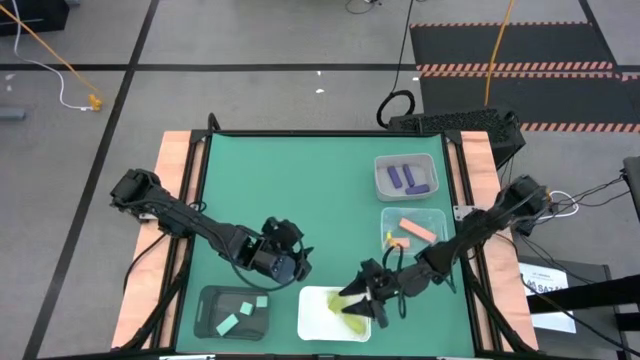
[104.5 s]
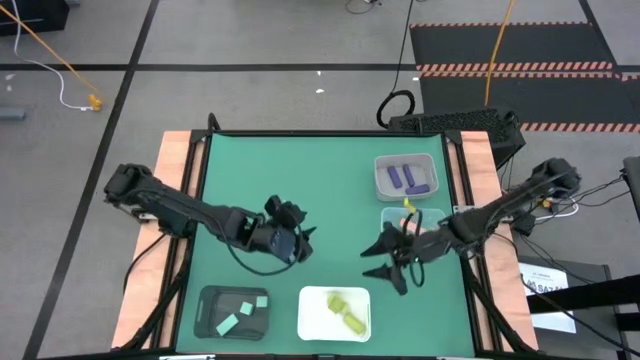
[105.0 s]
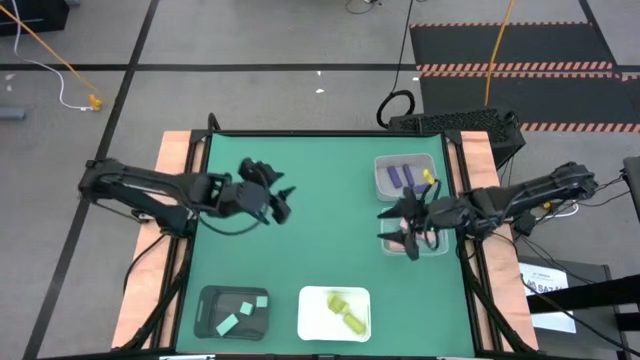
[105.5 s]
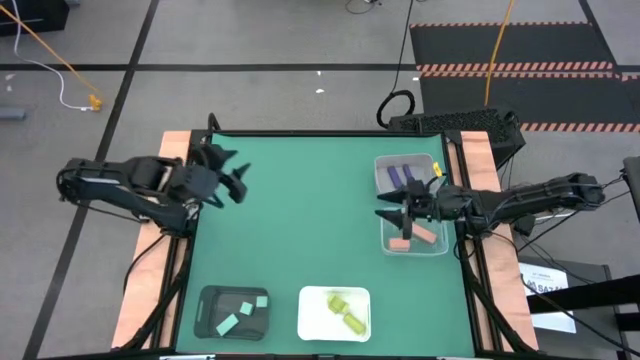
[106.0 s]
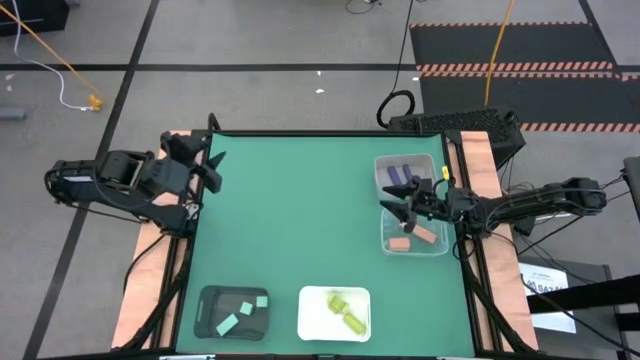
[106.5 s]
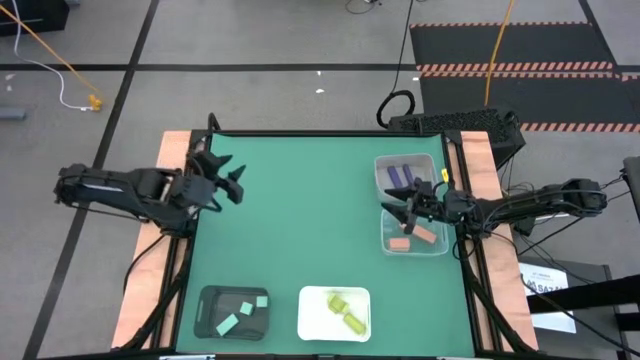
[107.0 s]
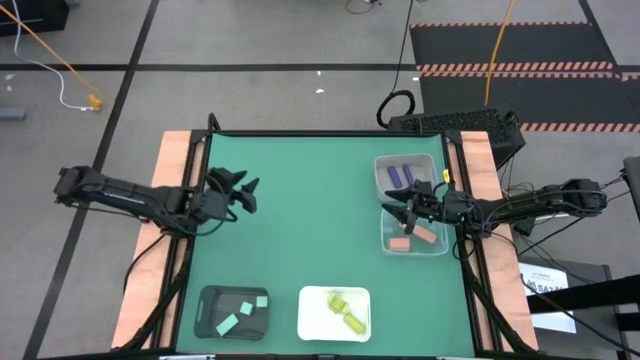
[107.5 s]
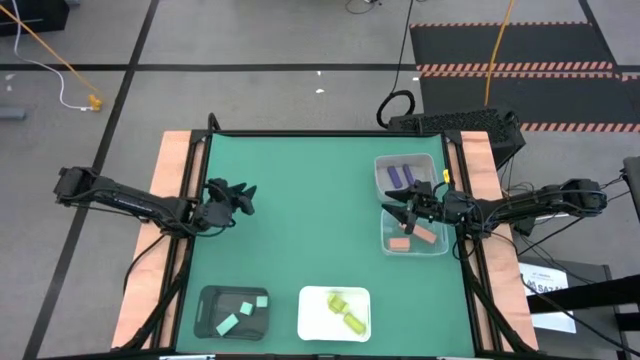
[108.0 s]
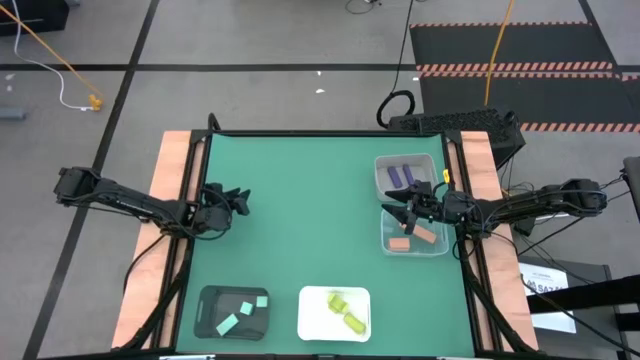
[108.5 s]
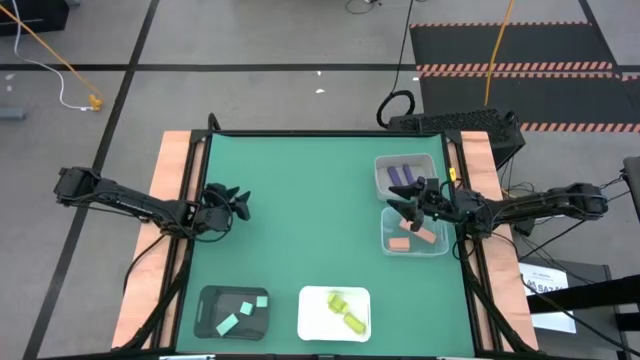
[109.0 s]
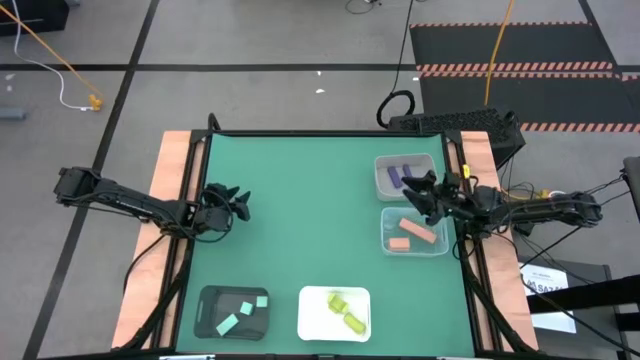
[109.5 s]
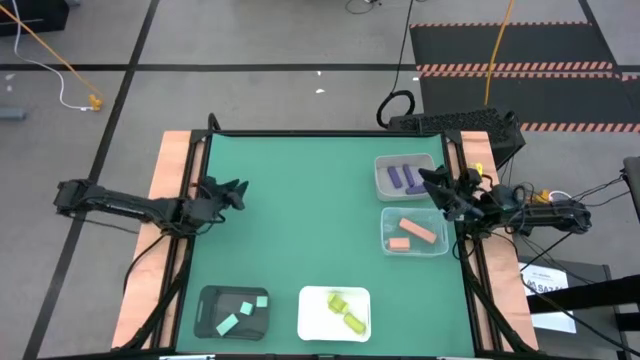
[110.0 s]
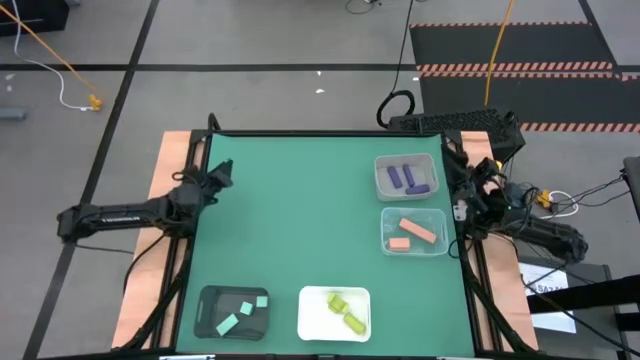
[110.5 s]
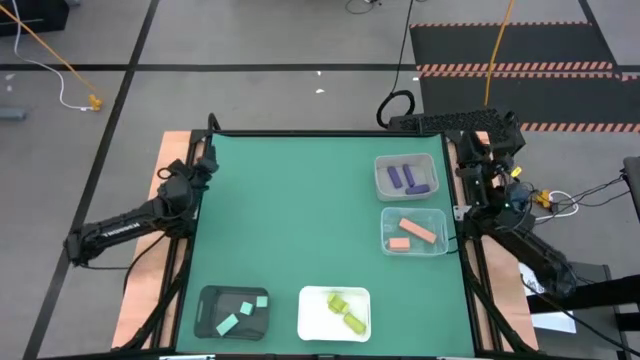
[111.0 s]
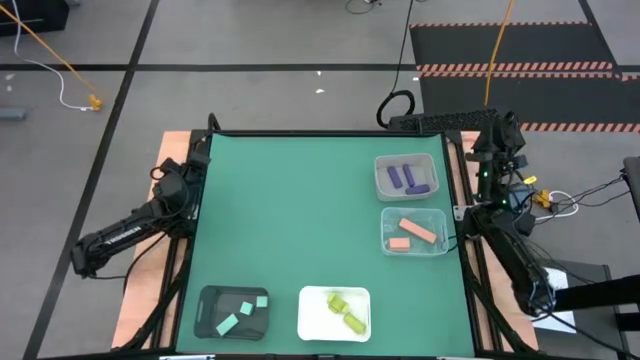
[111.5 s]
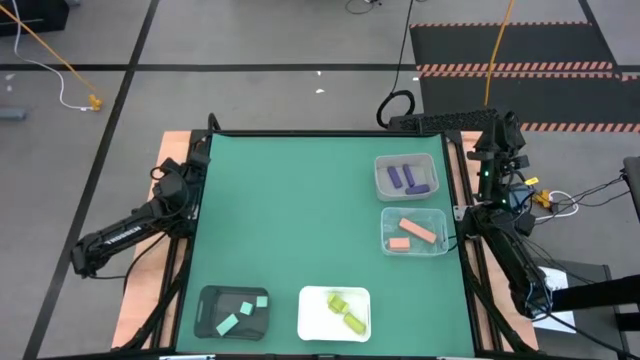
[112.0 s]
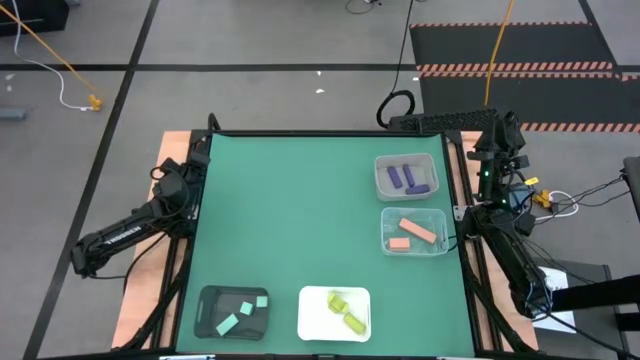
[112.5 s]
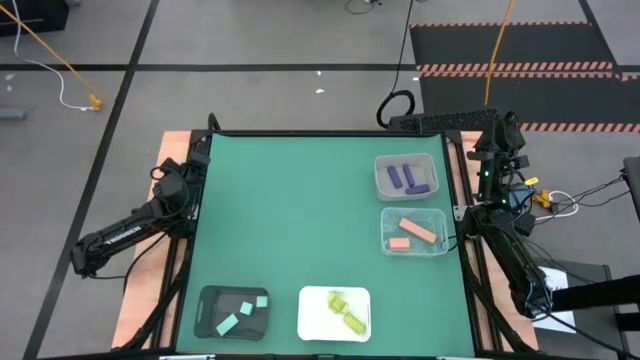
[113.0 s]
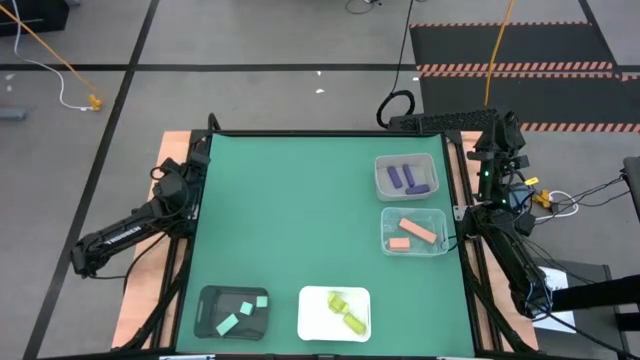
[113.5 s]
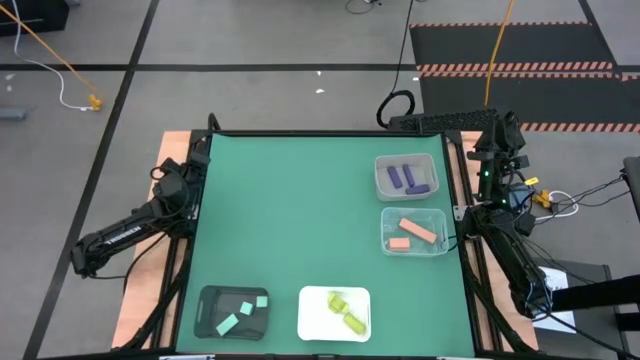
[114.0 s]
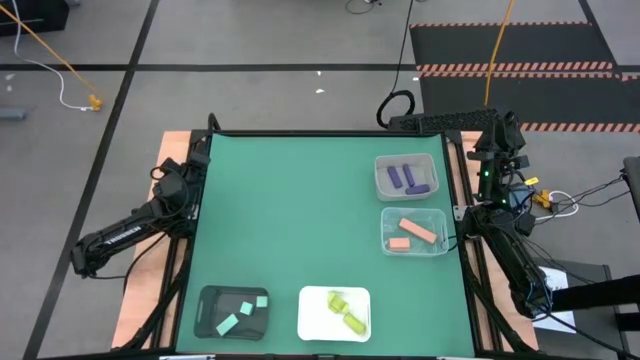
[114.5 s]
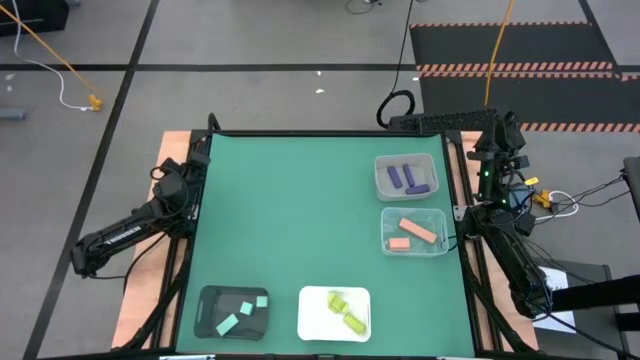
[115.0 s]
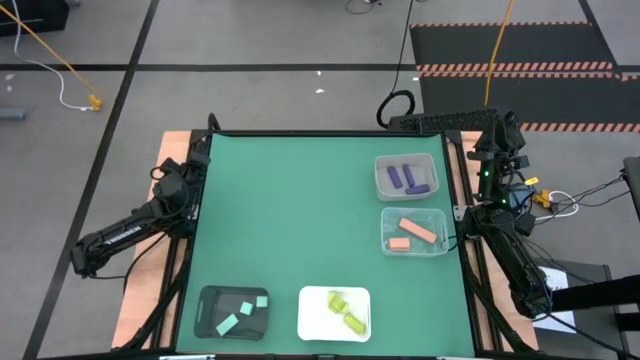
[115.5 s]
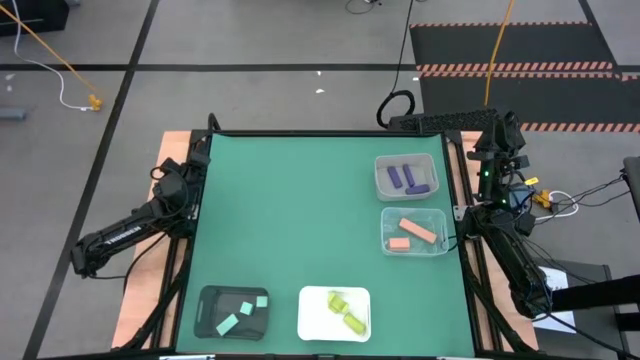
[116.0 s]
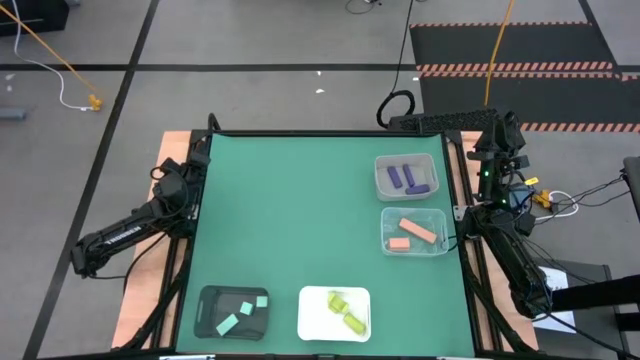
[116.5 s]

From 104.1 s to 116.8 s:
Task: Sort & place blocks by color
Return to Home Position

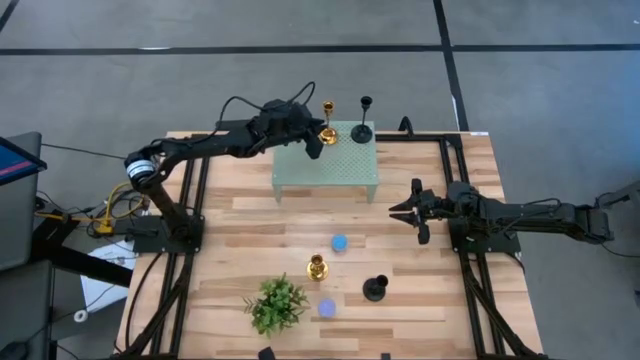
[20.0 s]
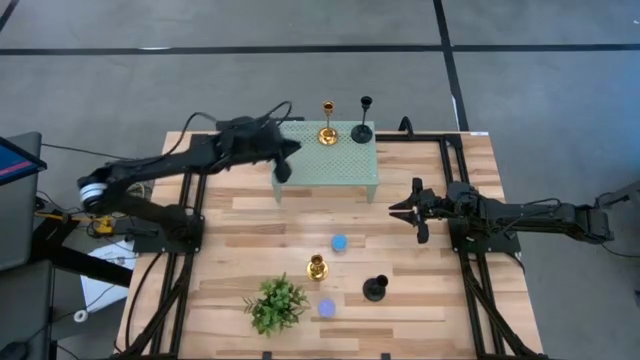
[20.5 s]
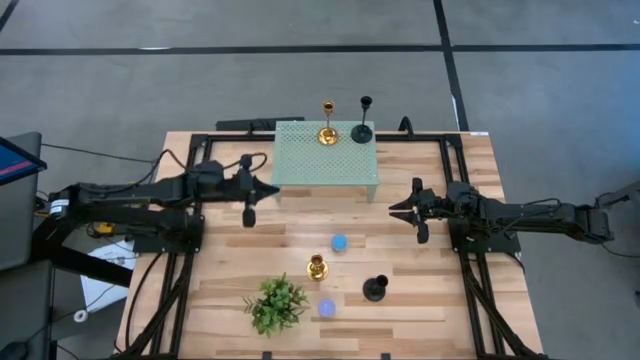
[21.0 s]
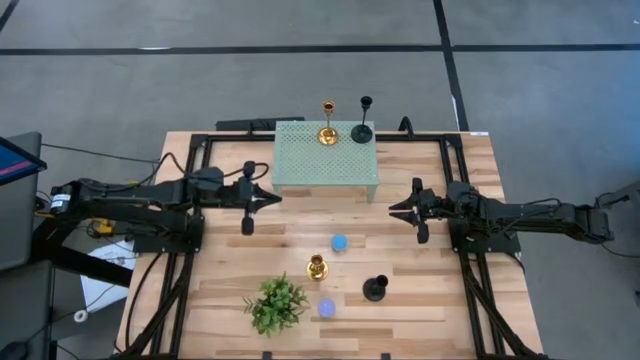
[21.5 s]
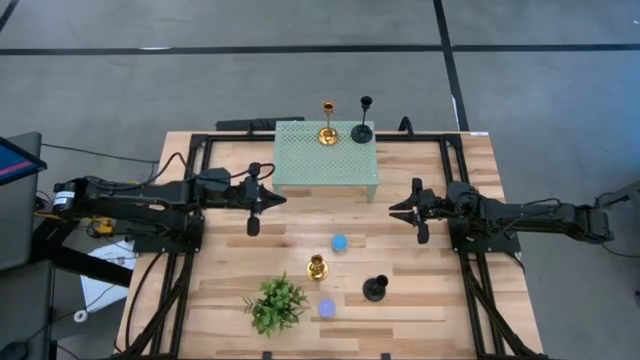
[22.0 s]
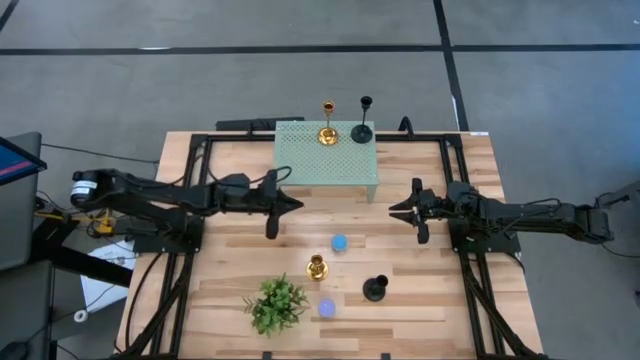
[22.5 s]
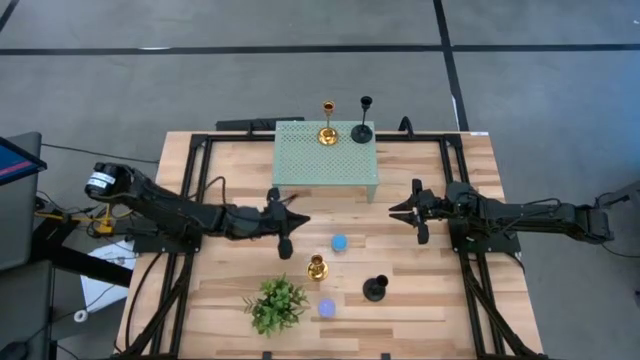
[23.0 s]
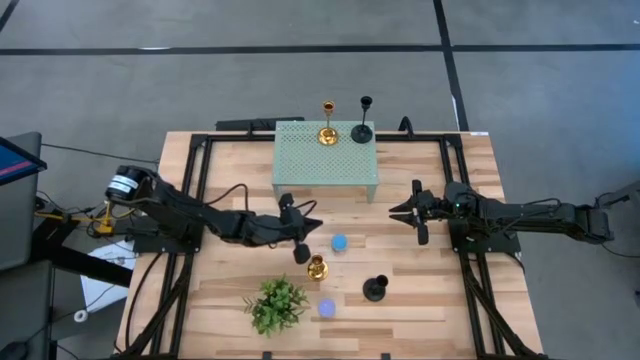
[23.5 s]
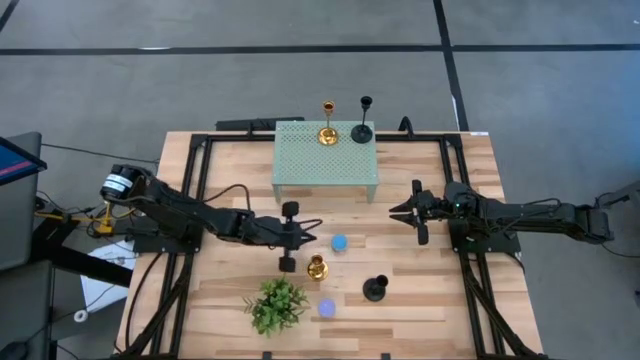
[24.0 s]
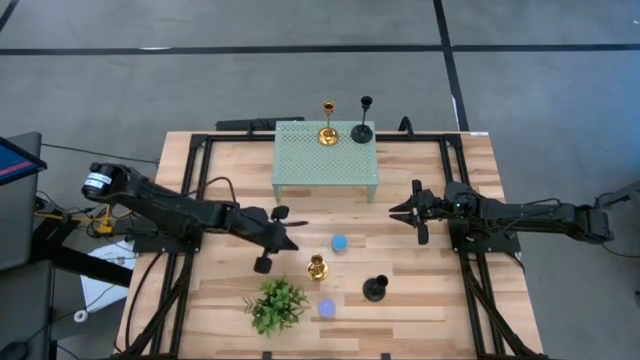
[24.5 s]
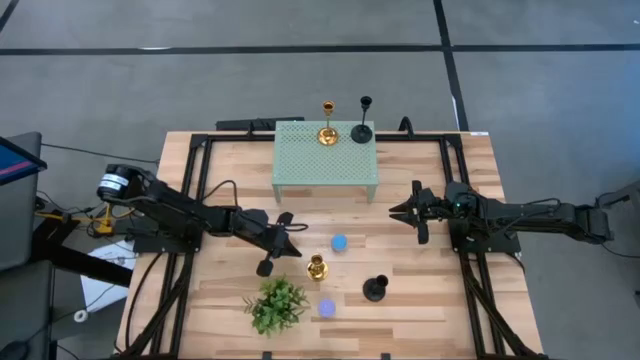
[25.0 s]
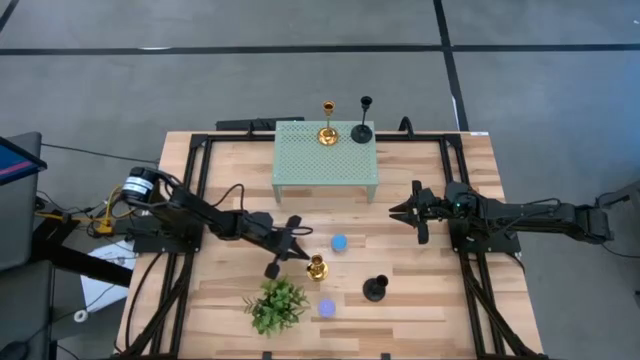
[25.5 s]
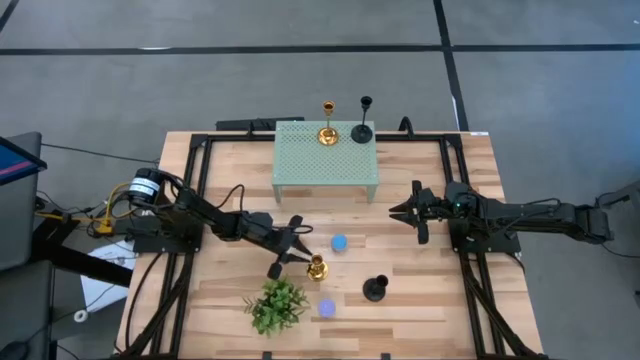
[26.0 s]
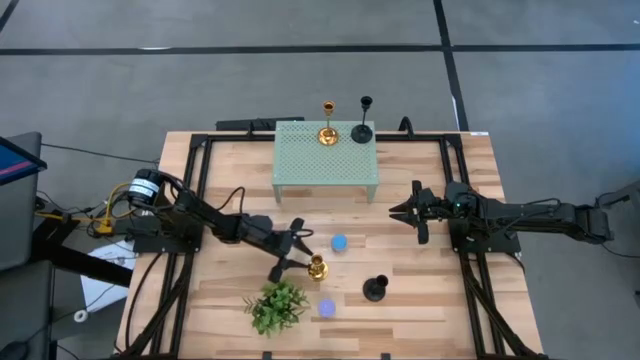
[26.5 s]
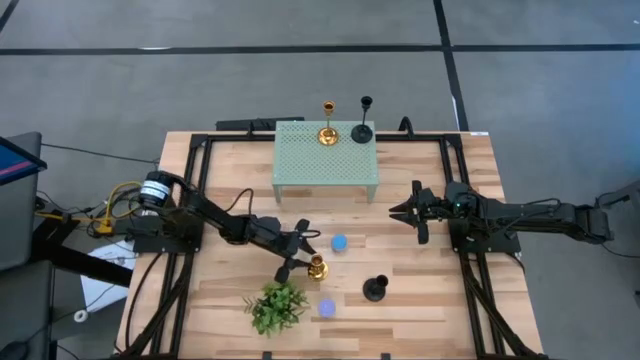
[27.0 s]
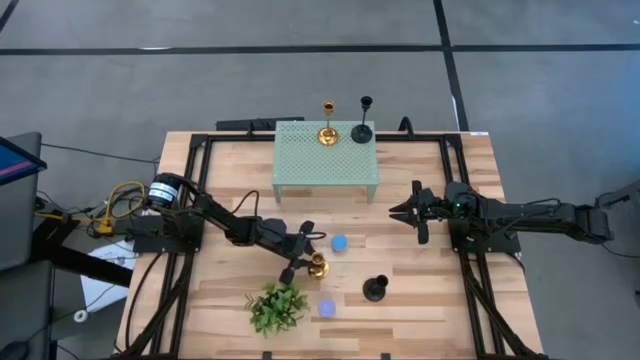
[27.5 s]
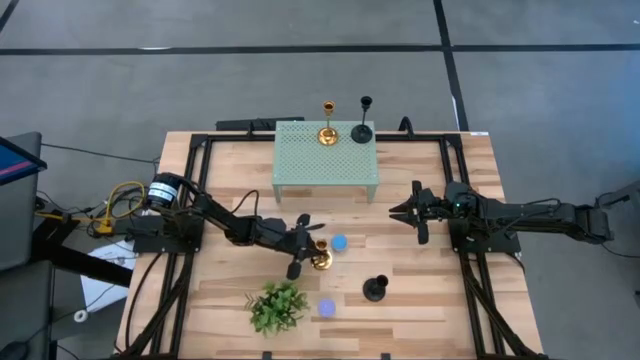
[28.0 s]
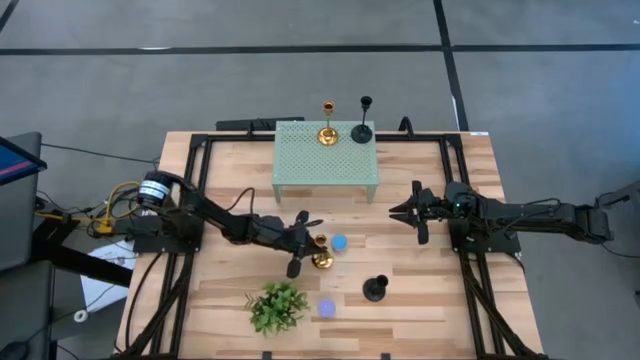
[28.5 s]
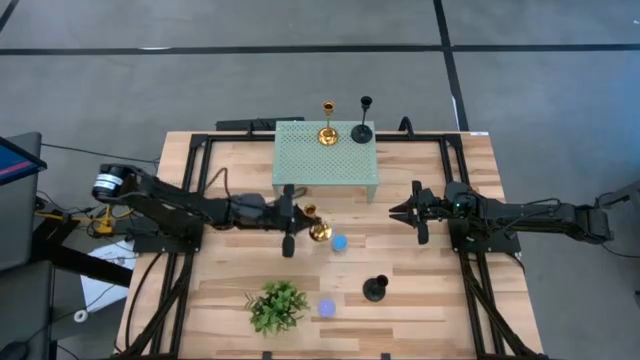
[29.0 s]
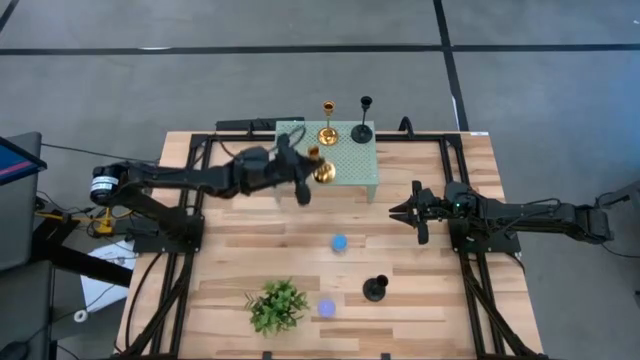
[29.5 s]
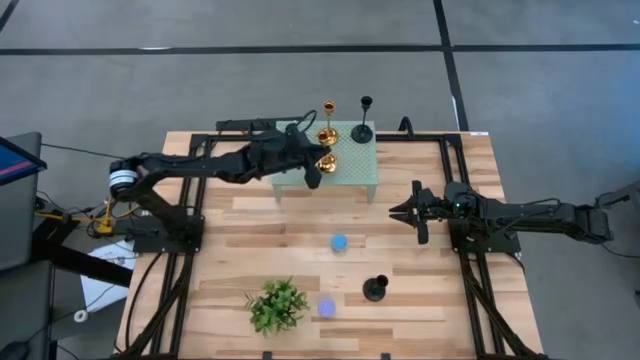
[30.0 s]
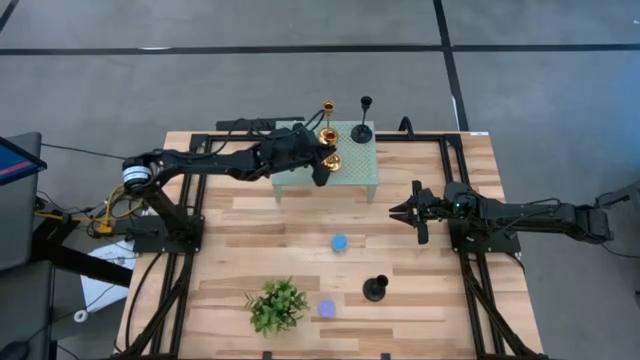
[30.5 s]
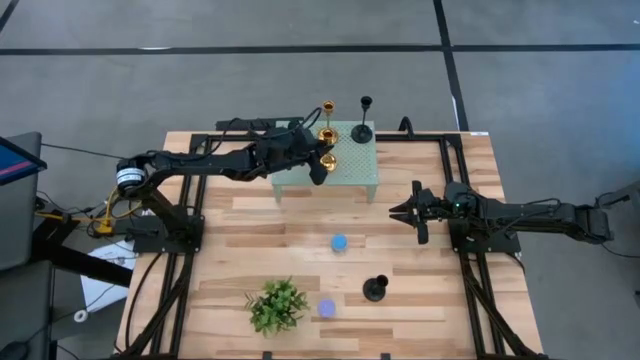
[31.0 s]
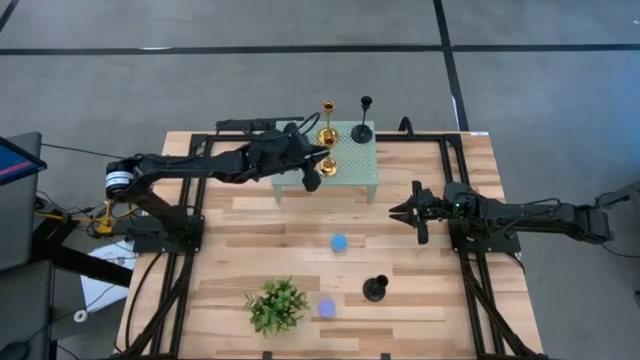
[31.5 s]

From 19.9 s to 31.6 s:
Task: Pick & Place candle stick holders
Put the gold candlestick on the shelf
